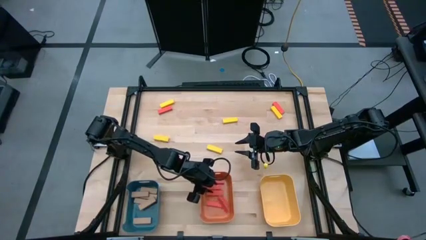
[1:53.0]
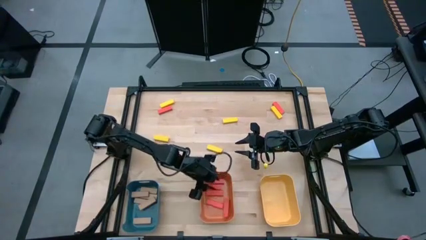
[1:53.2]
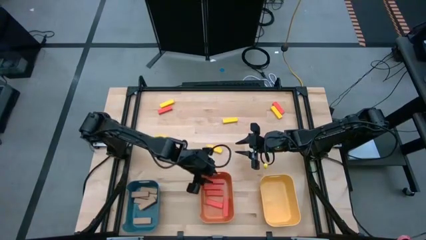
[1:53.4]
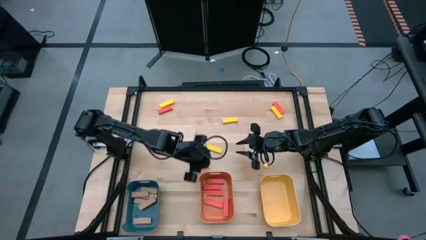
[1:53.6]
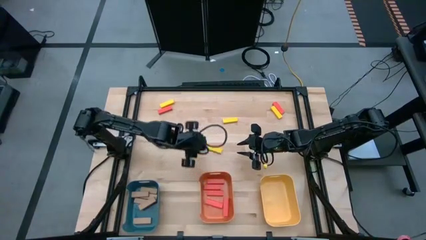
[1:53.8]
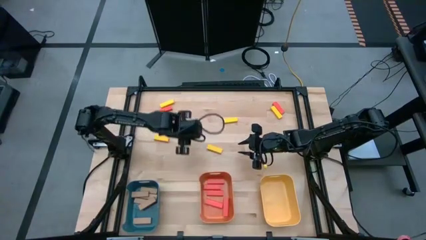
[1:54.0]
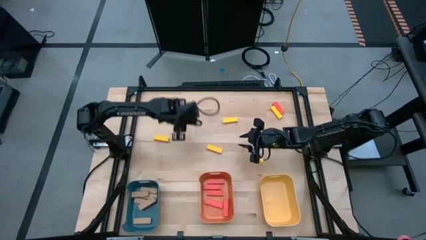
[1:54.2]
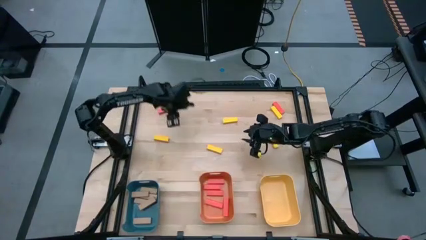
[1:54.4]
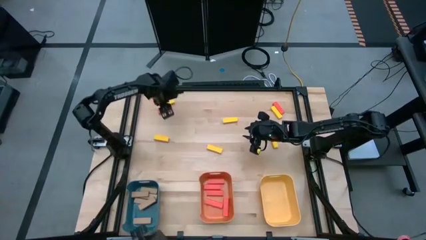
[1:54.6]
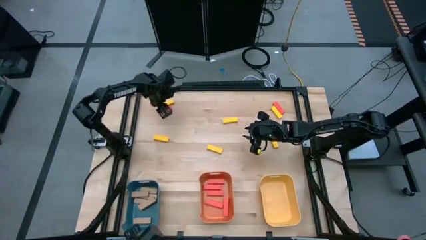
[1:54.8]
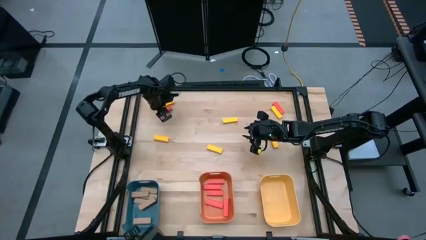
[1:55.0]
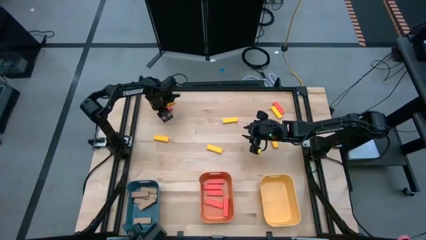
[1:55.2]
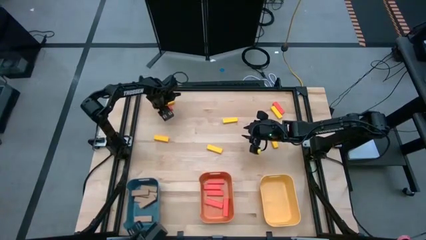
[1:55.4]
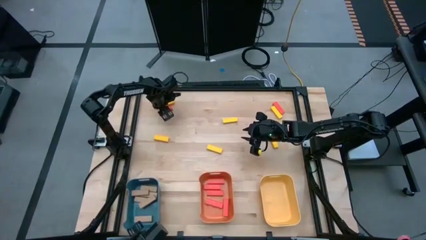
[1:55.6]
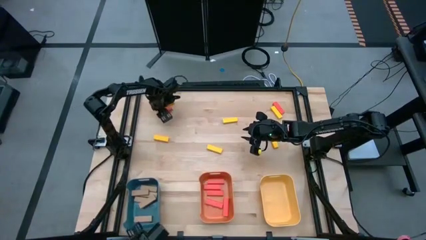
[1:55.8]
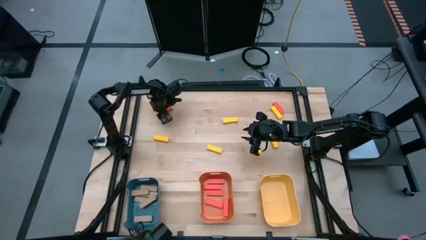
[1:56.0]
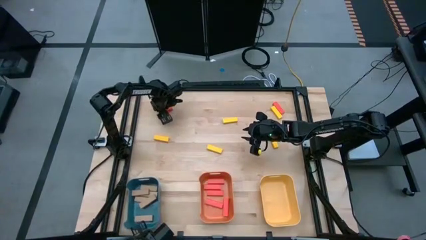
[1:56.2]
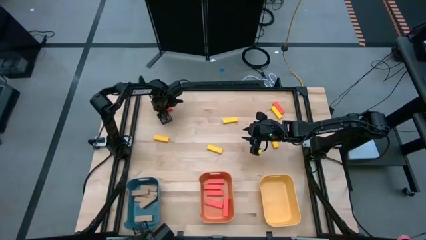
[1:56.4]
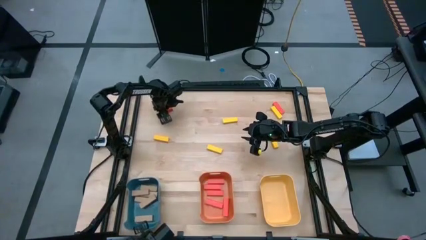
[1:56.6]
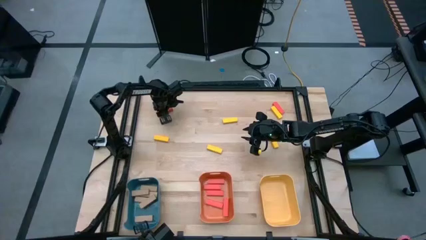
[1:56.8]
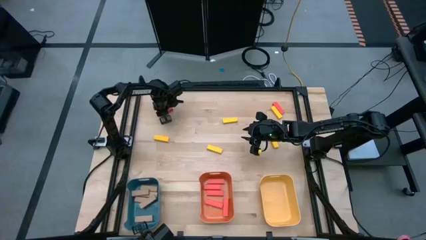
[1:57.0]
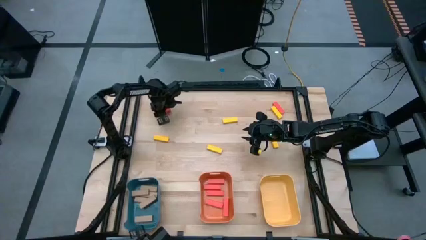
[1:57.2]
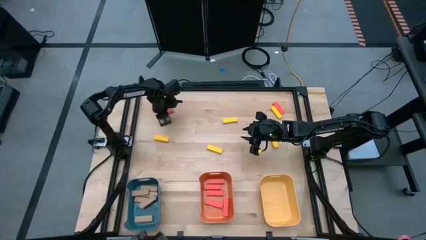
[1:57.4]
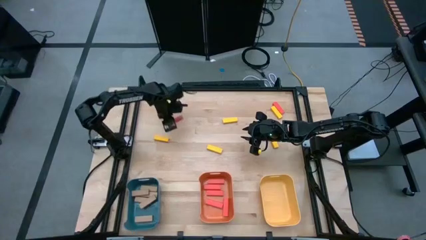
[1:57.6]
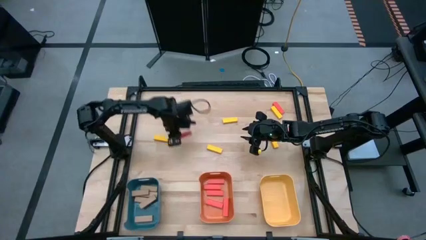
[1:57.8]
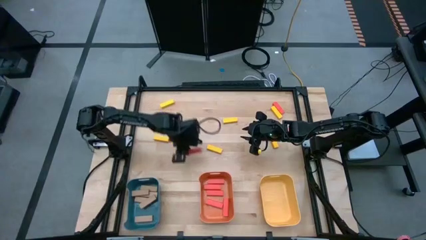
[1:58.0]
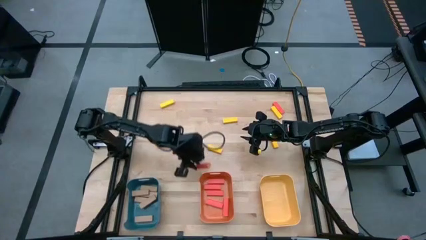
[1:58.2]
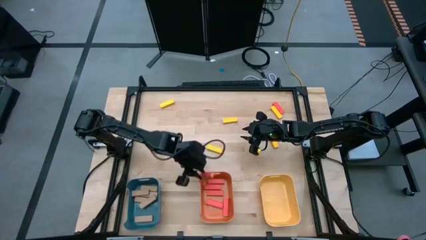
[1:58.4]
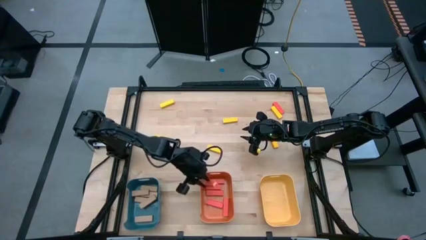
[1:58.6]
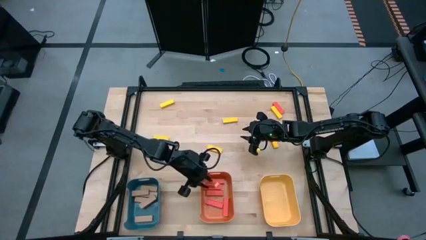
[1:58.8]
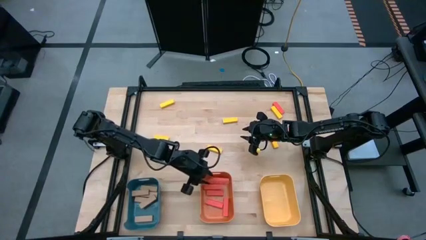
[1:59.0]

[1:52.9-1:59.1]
Task: Sort blocks
Put the left orange block into the orange bin

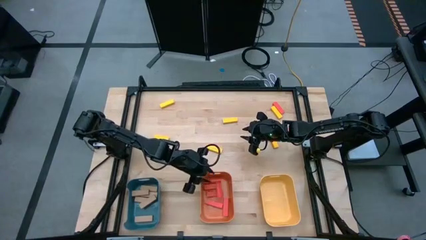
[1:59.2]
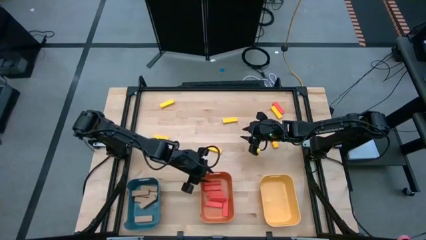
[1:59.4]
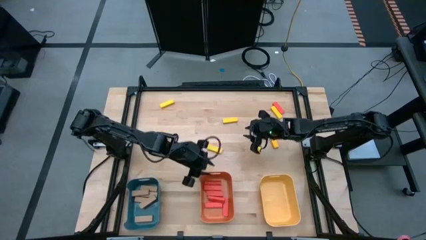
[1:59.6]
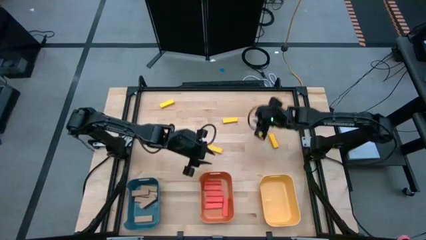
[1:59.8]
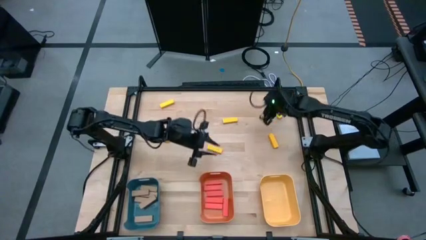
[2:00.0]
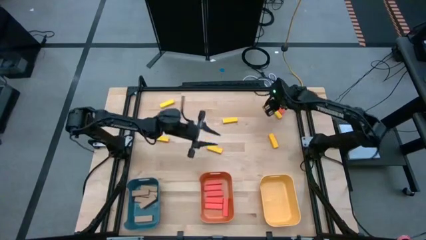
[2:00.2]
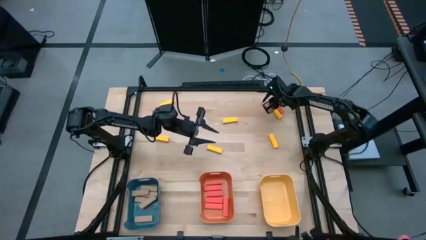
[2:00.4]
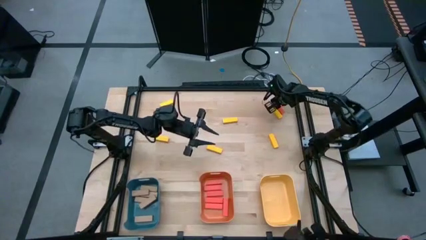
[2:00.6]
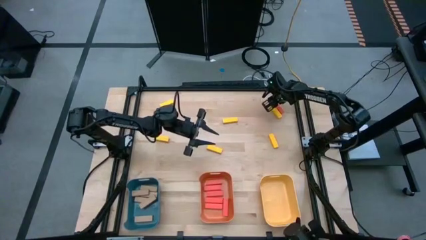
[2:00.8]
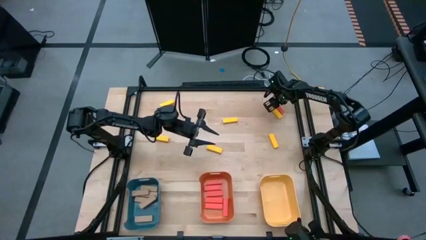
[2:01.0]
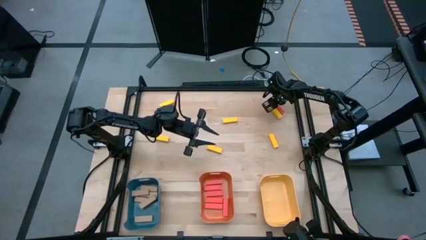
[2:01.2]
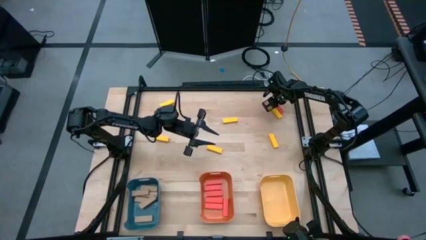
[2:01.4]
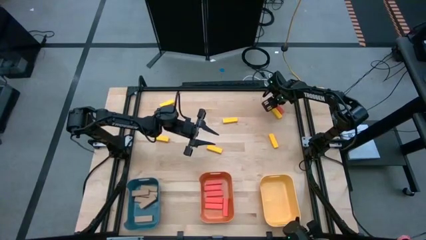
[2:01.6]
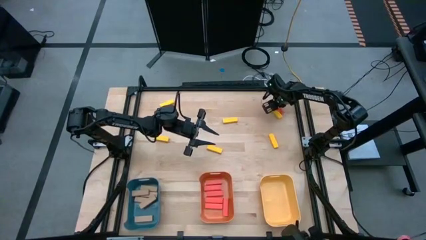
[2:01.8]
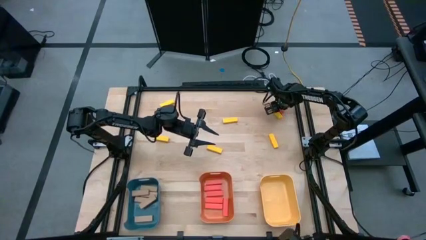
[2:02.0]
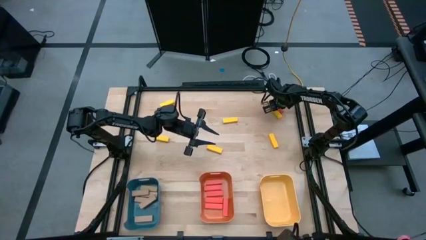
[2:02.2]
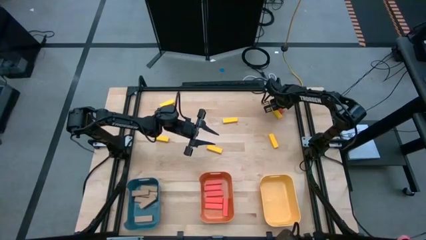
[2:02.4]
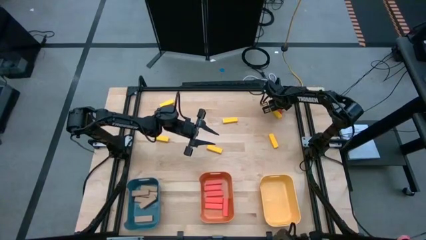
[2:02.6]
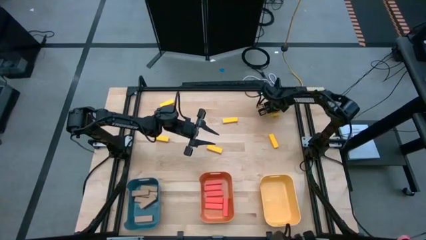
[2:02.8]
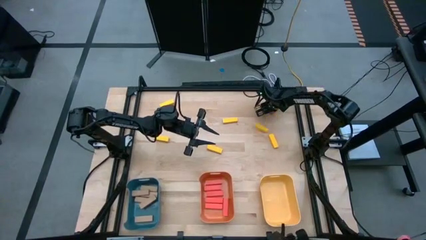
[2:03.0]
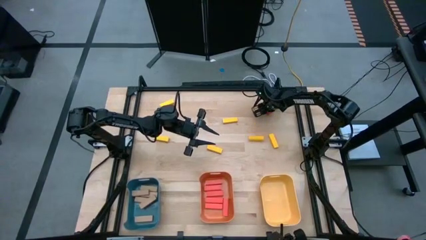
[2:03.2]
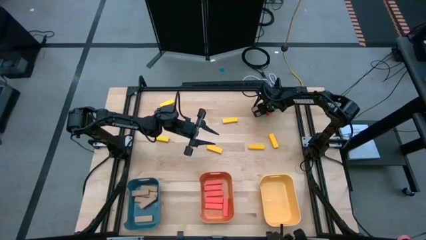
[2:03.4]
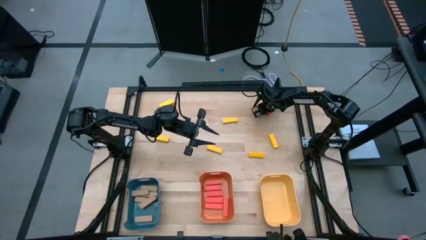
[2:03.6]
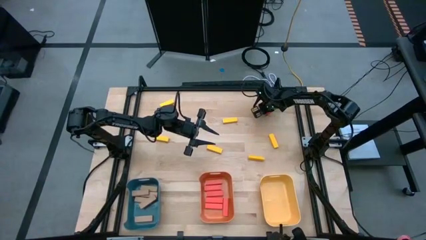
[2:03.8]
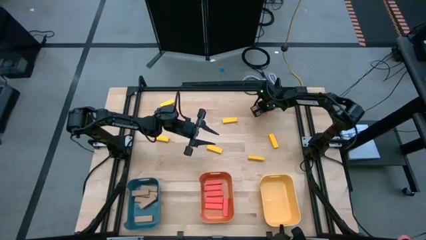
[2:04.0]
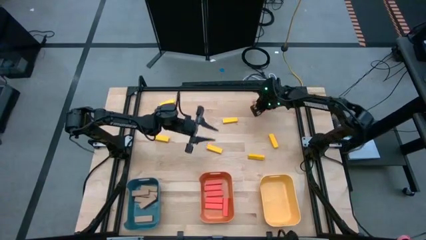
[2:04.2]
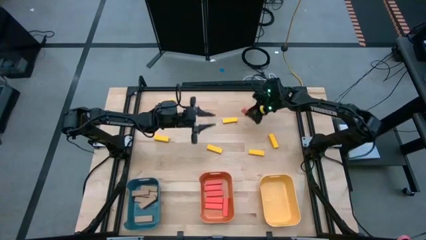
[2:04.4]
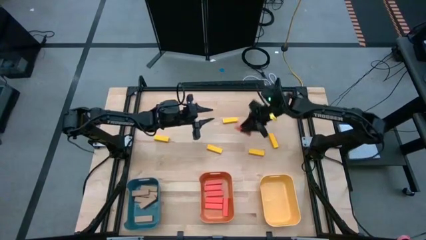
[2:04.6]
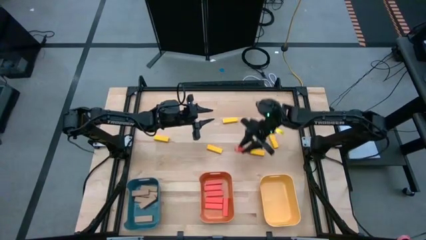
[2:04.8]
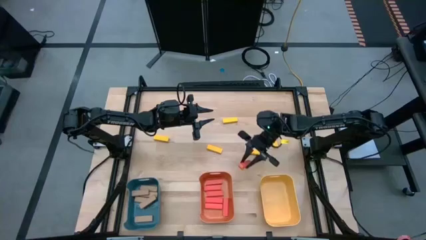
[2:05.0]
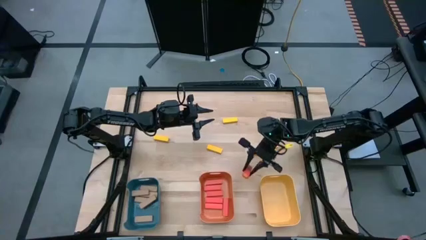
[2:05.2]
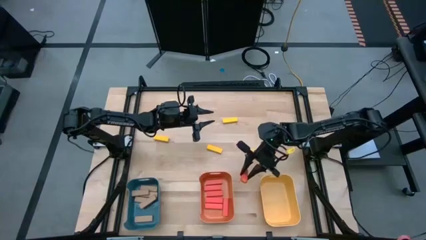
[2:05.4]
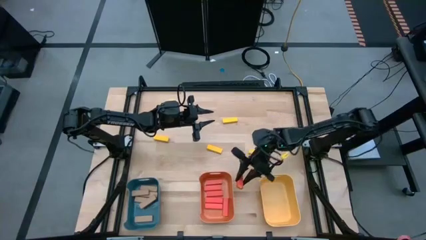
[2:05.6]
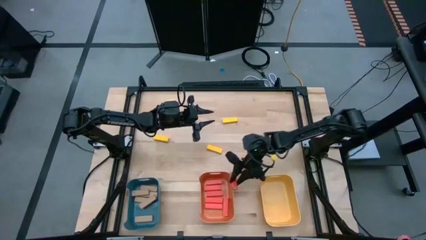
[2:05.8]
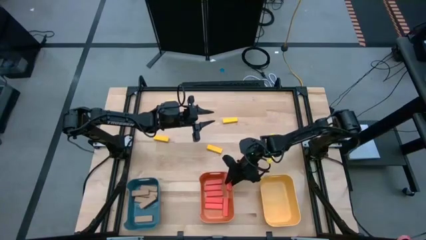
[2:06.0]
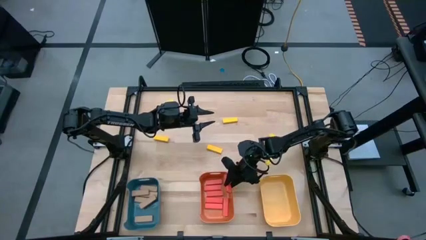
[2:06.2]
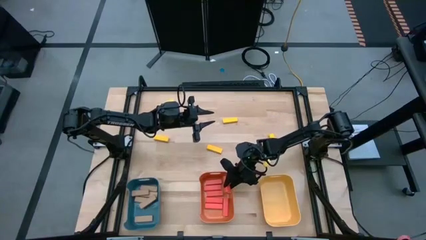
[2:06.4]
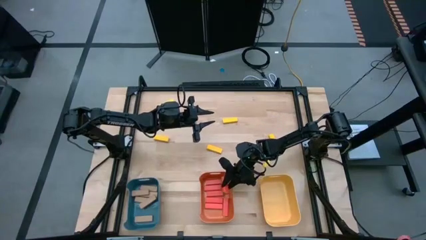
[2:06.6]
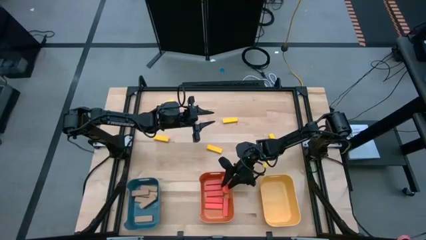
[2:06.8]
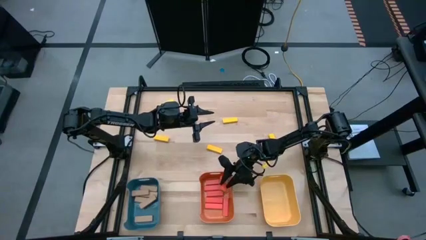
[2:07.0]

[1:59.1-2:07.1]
Put the right orange block into the orange bin
